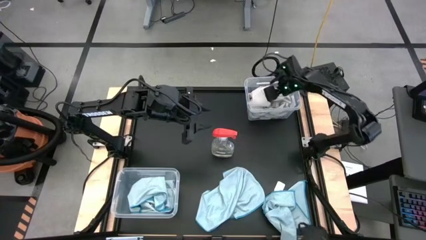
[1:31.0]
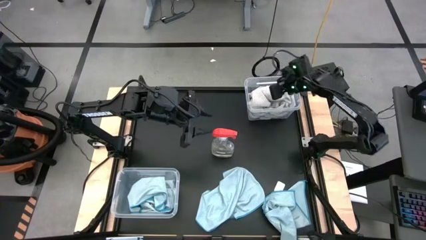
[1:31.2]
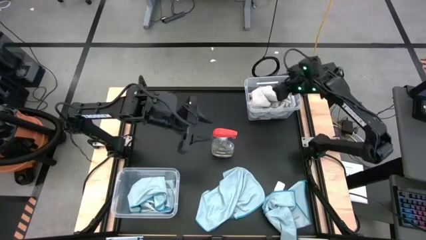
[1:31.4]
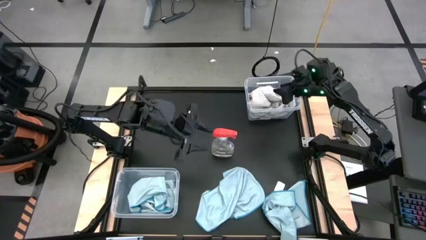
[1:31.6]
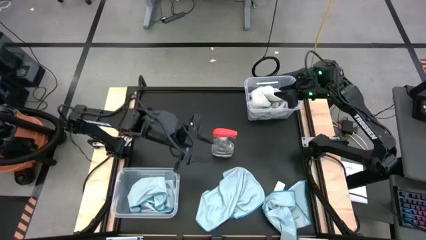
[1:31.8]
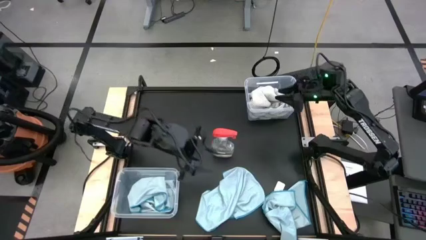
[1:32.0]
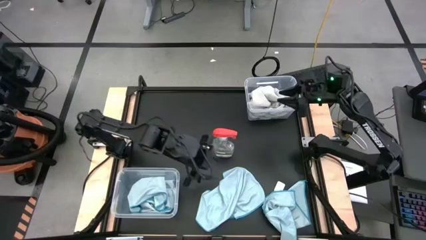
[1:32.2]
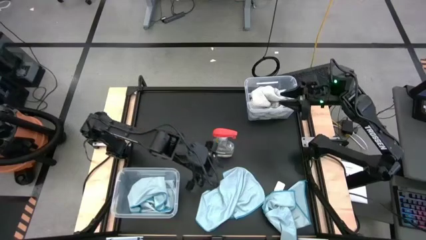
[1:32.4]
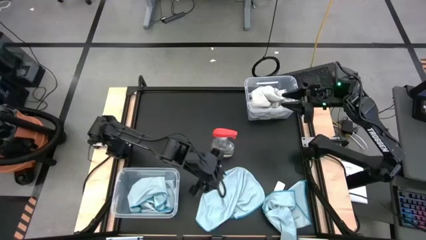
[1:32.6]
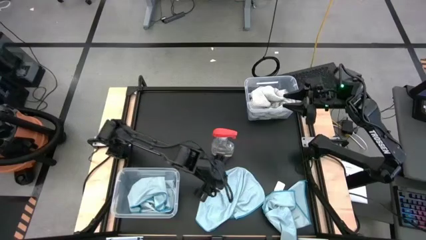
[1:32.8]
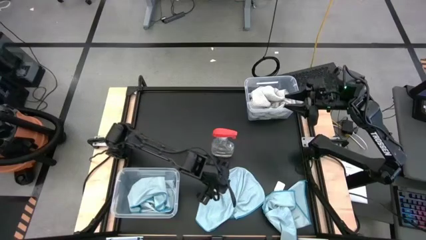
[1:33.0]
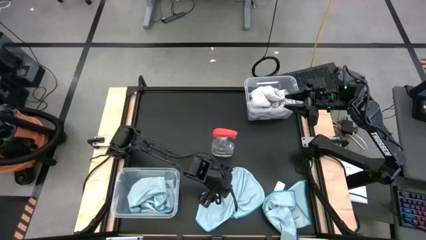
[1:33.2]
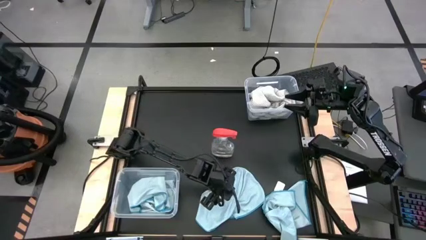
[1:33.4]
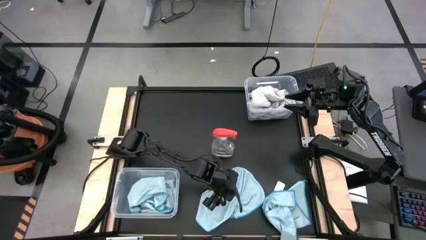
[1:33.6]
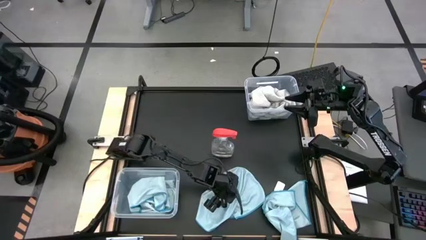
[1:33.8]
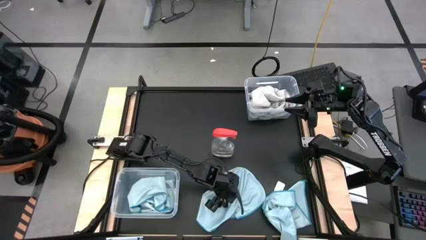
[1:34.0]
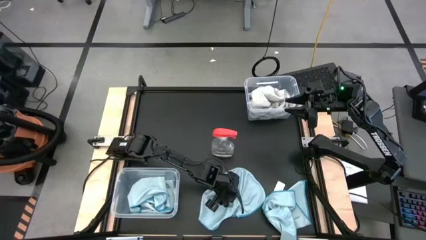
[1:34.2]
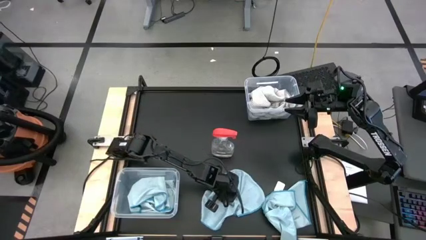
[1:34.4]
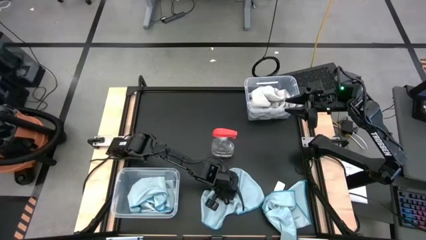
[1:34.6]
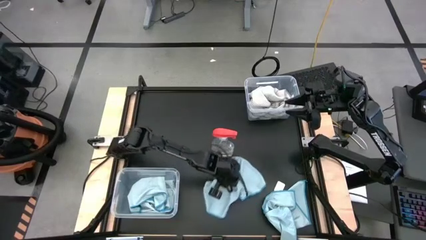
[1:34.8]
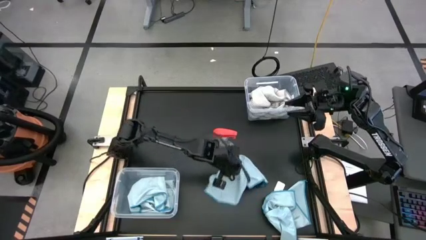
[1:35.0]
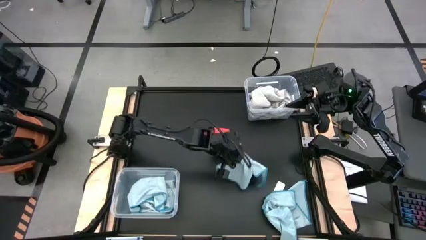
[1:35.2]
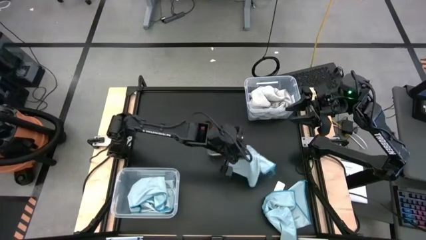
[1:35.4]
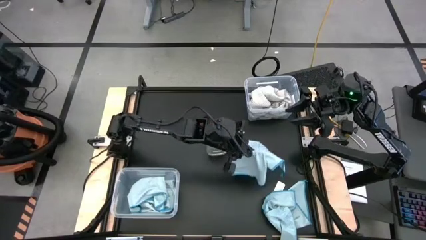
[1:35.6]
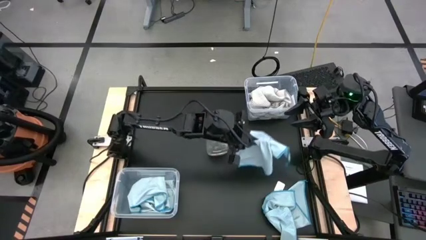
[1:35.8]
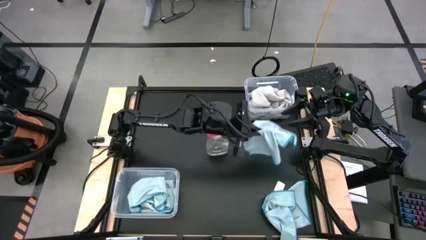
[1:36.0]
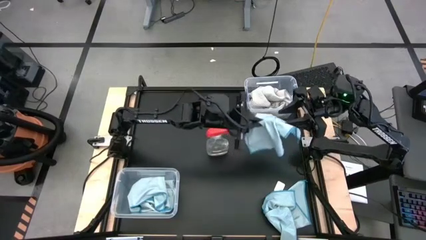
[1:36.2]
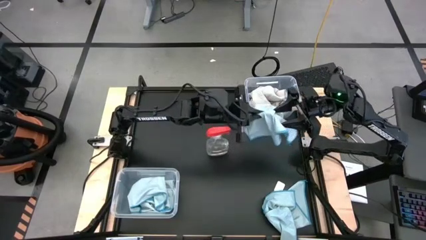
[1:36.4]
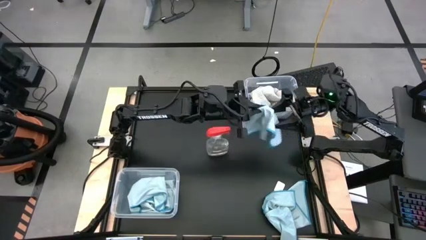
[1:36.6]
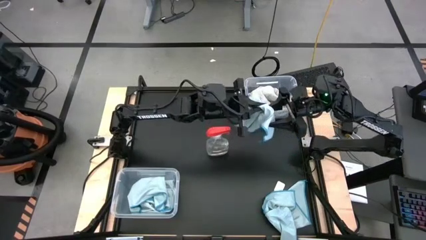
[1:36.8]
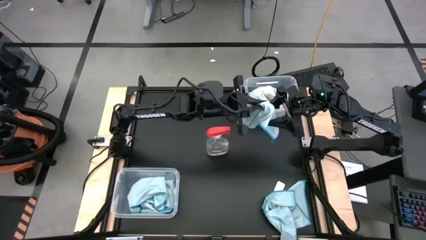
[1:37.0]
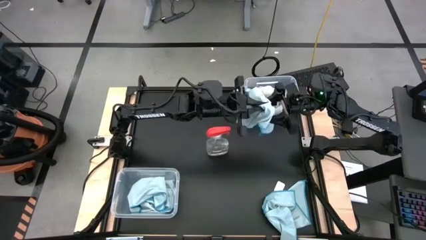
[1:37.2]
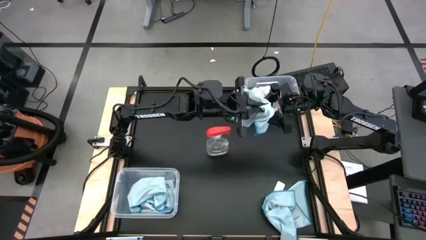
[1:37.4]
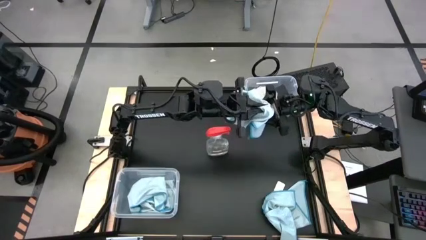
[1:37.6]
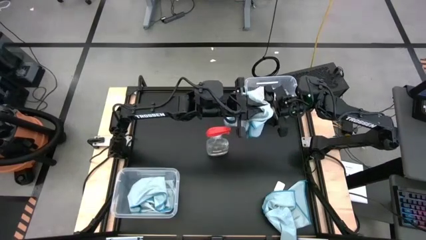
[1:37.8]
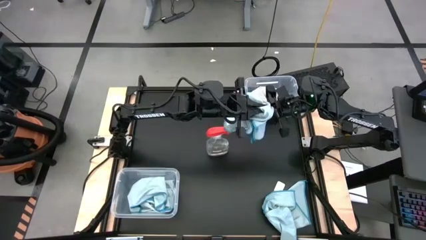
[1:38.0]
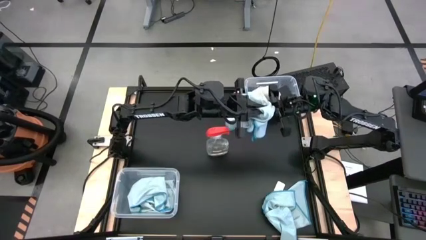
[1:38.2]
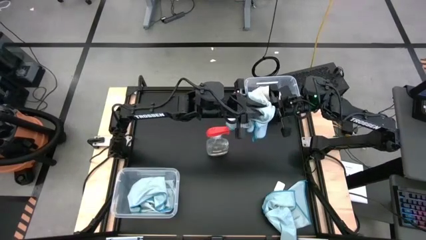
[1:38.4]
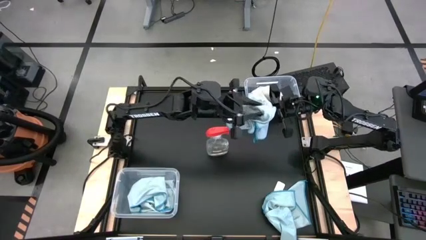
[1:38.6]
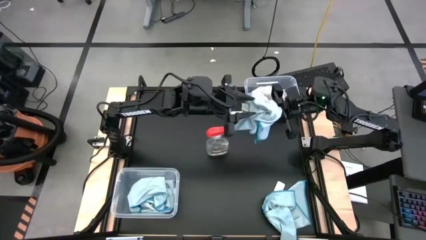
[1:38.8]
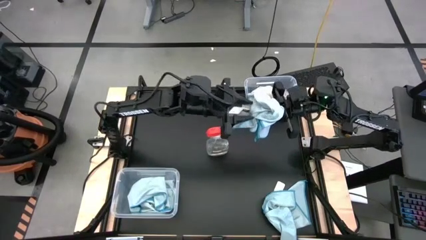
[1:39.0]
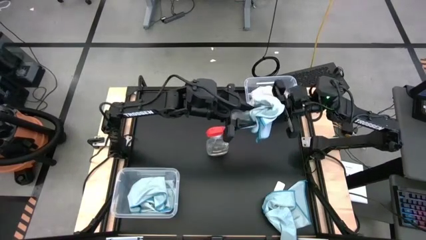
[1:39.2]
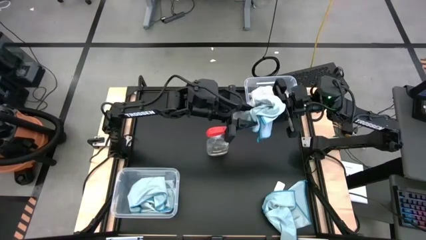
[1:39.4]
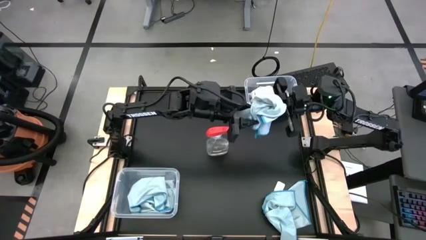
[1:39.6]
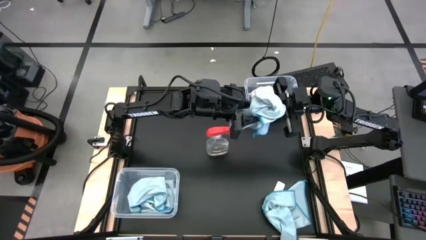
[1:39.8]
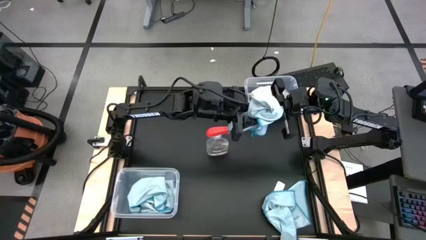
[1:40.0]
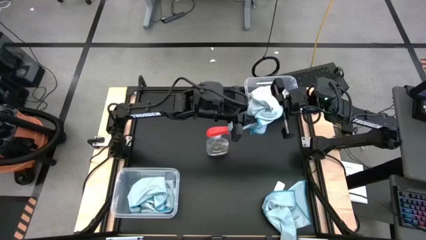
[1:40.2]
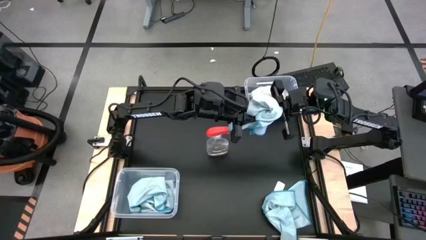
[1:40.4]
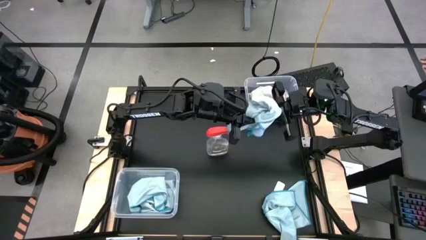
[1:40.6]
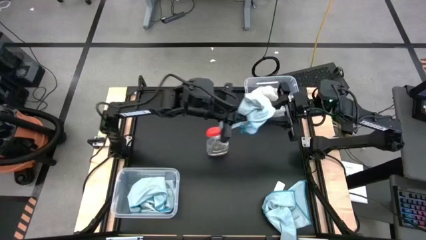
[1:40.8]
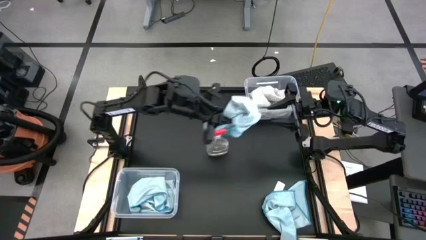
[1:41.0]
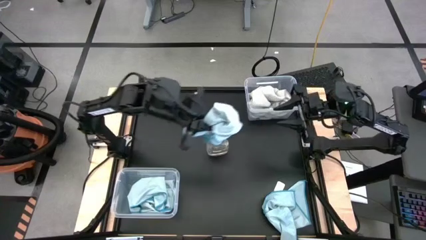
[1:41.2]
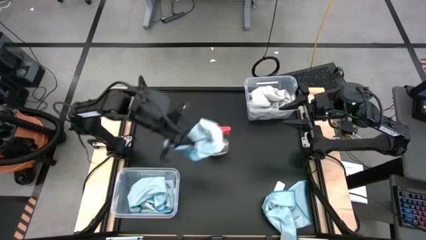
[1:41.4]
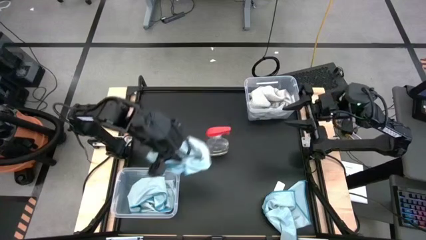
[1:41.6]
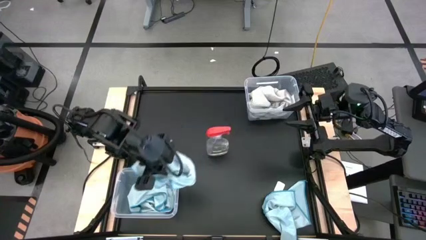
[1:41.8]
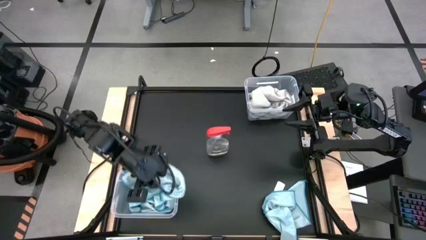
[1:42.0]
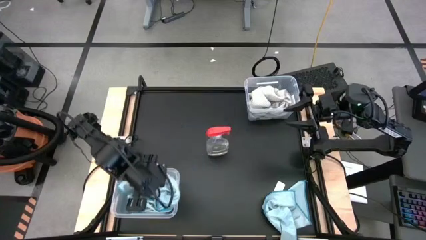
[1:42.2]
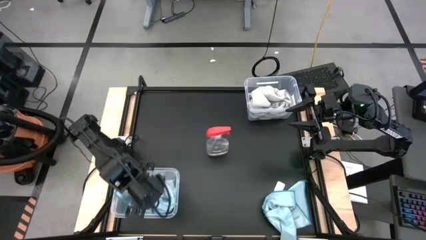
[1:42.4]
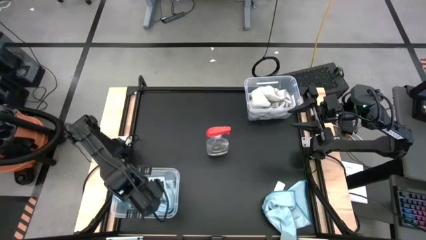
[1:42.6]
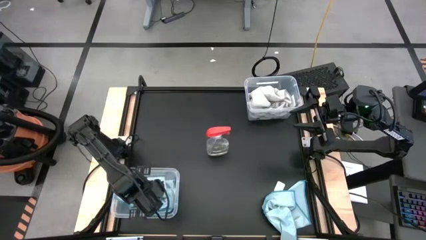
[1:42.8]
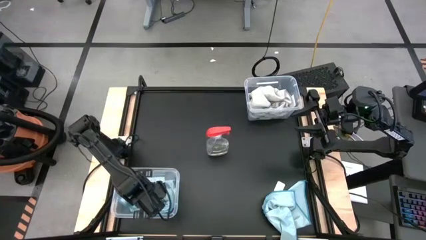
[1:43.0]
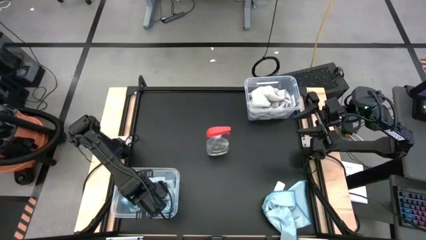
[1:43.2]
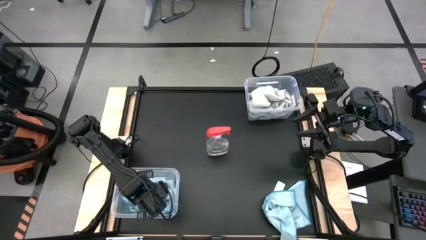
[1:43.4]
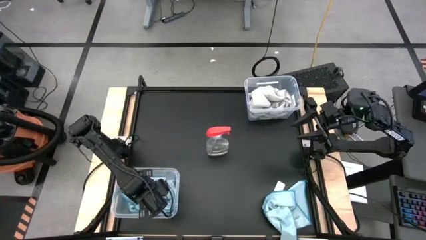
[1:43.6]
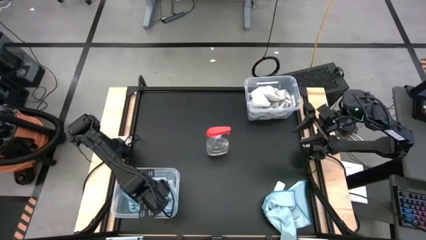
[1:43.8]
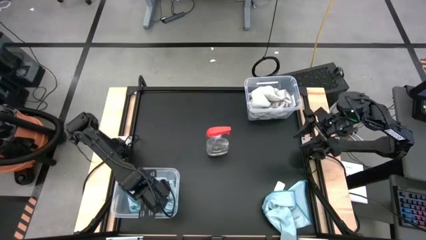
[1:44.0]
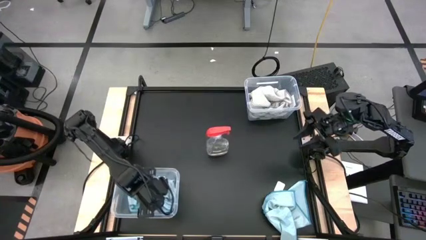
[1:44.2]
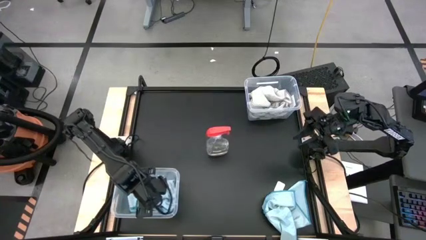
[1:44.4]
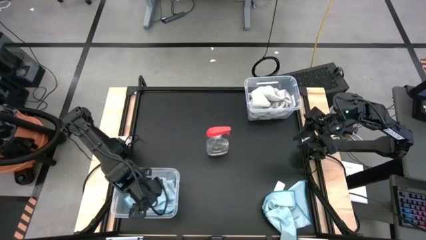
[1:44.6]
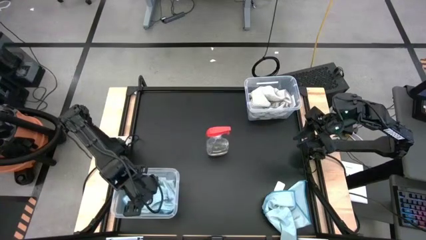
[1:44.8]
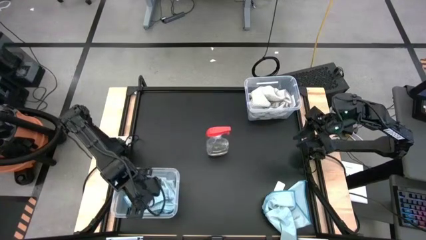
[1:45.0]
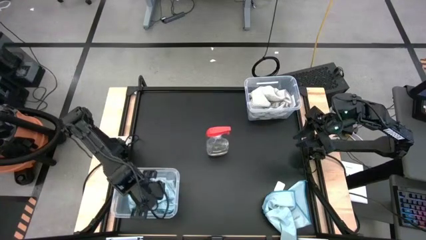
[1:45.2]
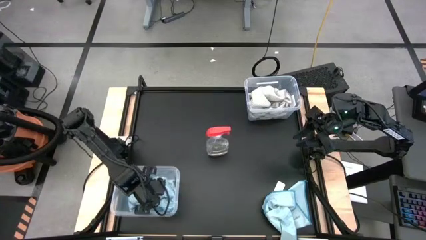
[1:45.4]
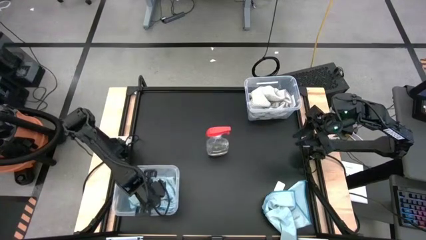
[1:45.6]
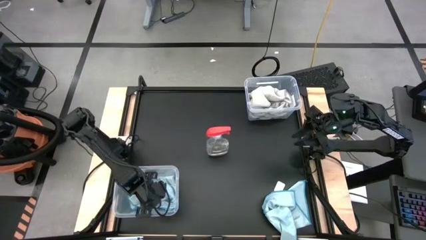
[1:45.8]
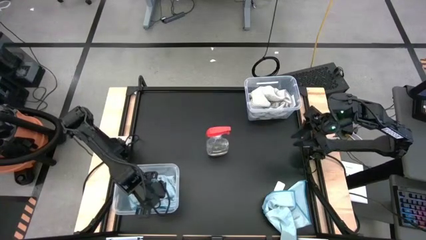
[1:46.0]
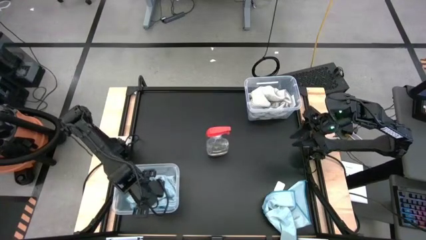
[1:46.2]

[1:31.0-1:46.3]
Task: Sort microfiber towel by color & place in baskets
Put the blue towel into the bottom transparent bin

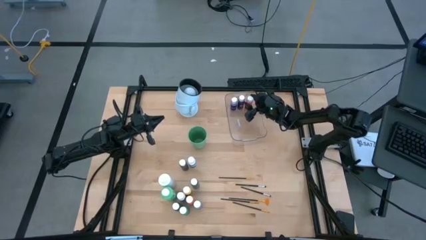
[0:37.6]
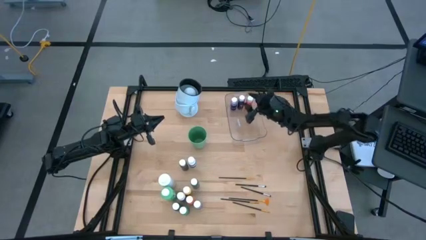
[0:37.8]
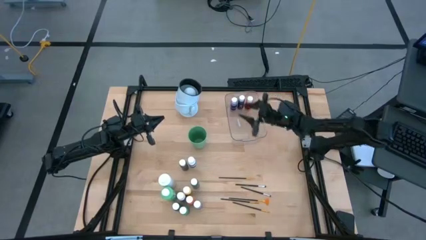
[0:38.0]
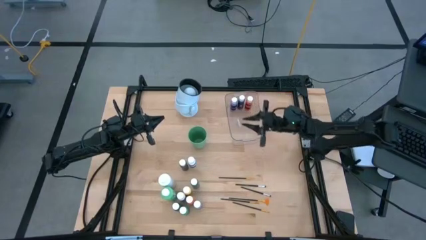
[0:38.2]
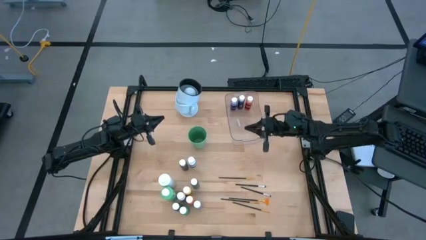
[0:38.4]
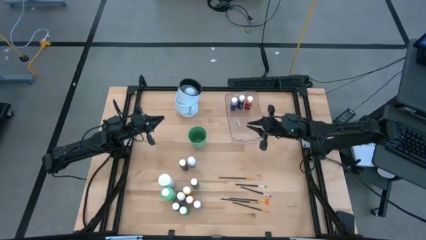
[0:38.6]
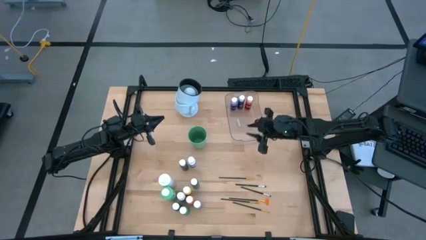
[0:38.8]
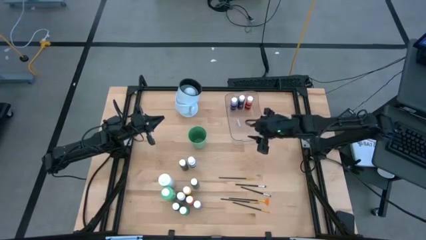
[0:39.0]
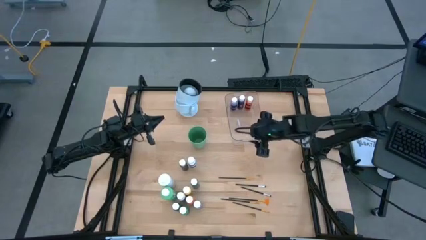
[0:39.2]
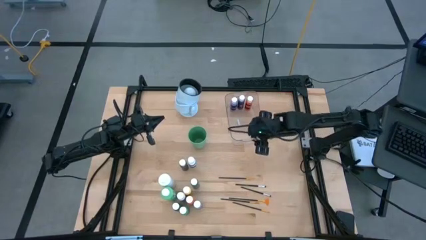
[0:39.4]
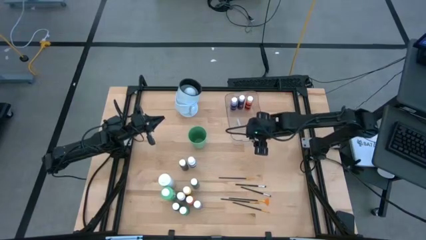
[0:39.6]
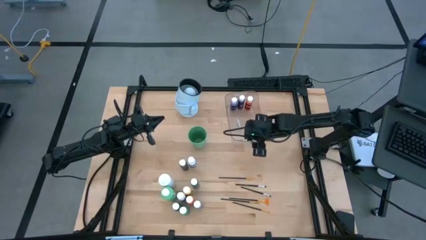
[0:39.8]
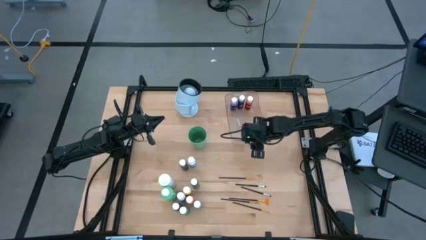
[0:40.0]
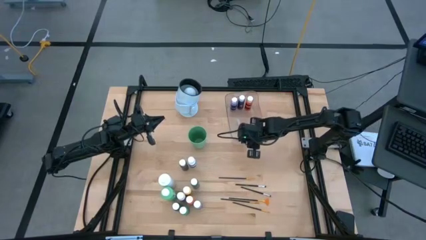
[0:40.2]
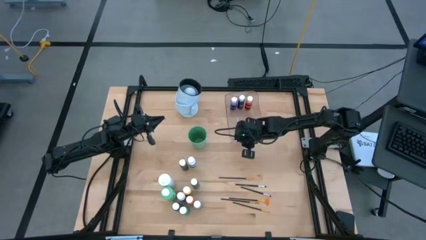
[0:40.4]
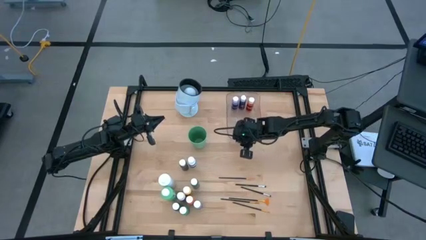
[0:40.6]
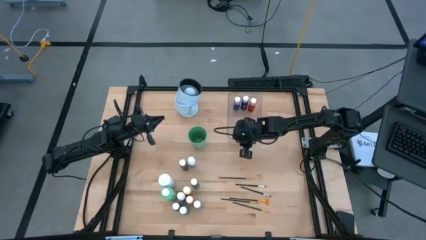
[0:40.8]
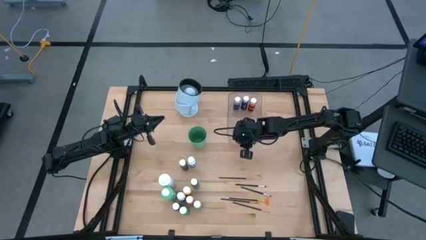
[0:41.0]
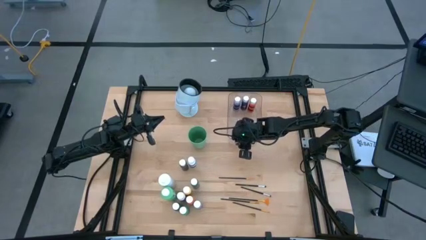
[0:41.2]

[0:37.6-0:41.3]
Task: Pick & Place Paint Supplies
Adjust the transparent bin
